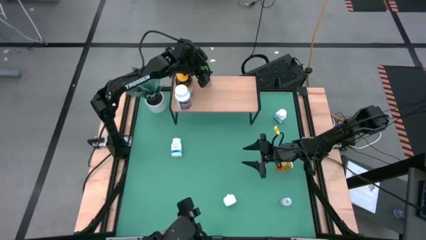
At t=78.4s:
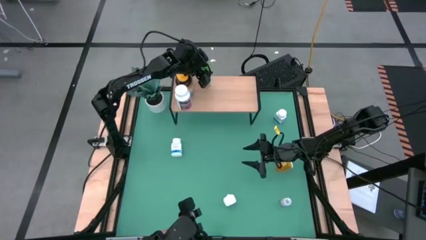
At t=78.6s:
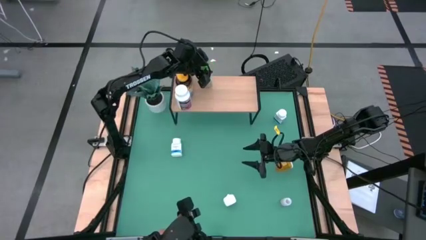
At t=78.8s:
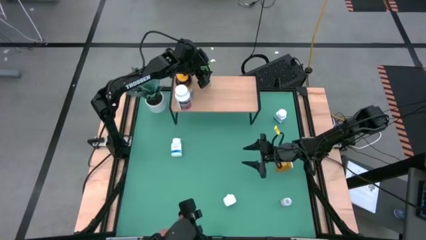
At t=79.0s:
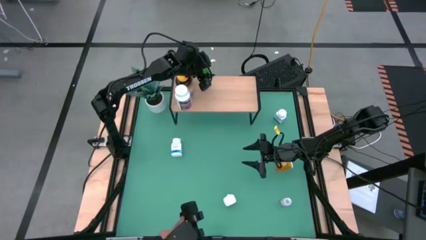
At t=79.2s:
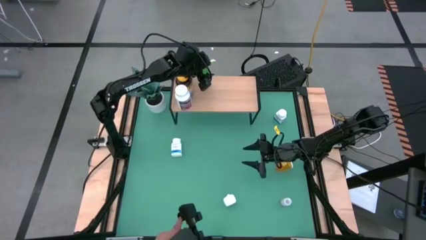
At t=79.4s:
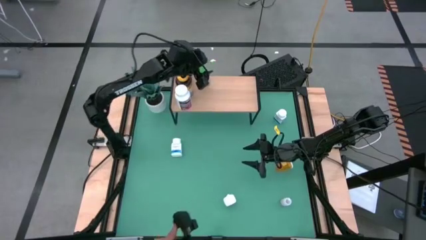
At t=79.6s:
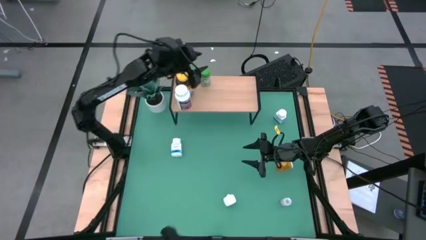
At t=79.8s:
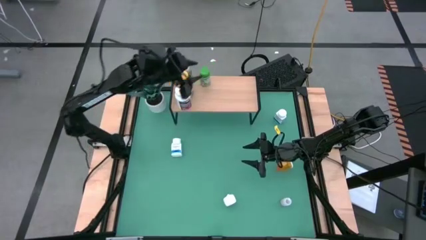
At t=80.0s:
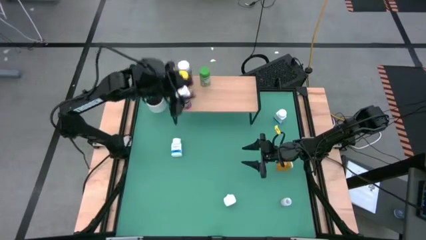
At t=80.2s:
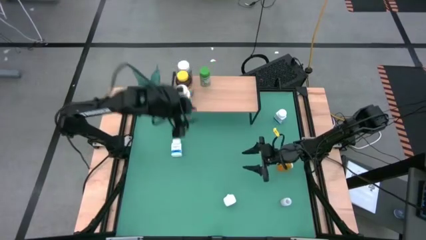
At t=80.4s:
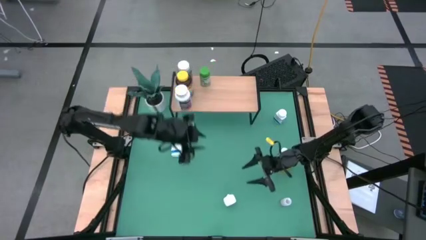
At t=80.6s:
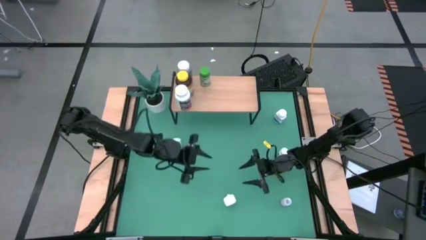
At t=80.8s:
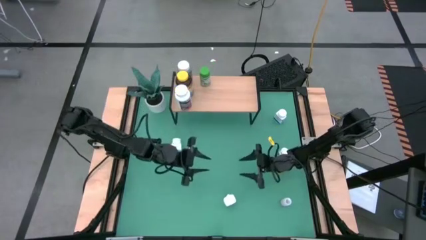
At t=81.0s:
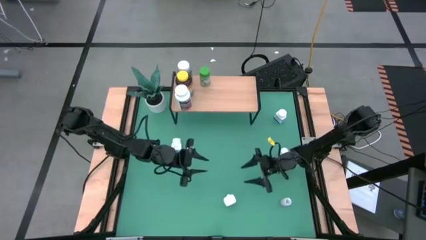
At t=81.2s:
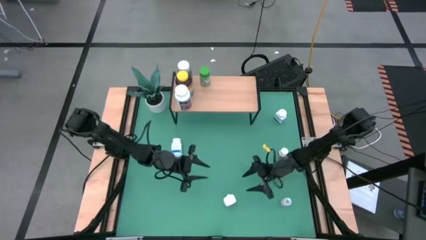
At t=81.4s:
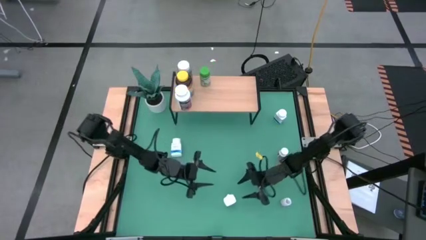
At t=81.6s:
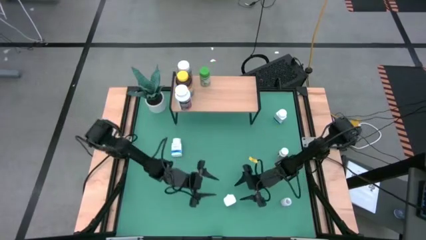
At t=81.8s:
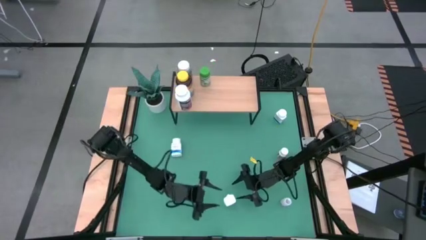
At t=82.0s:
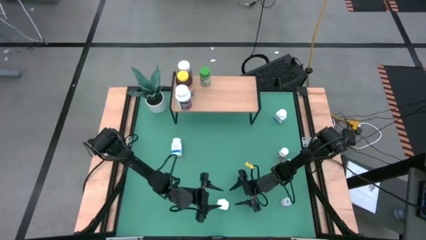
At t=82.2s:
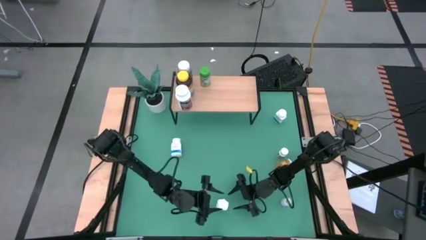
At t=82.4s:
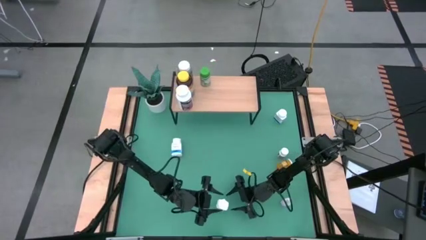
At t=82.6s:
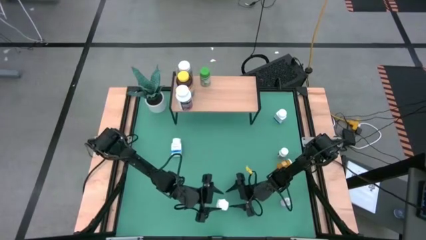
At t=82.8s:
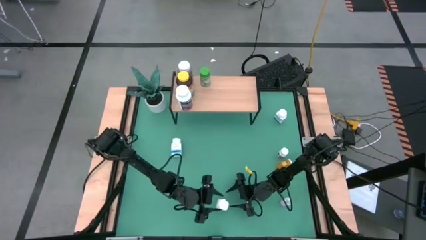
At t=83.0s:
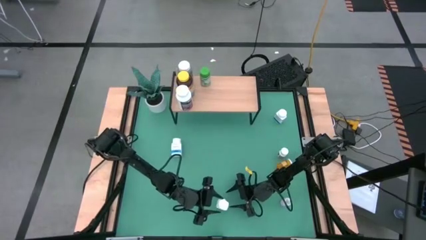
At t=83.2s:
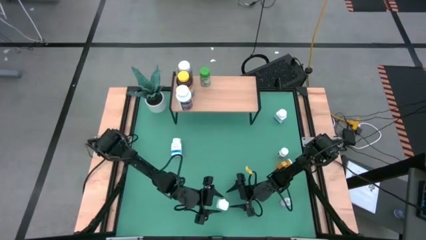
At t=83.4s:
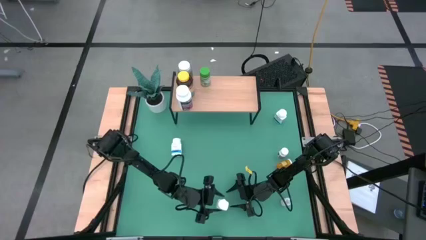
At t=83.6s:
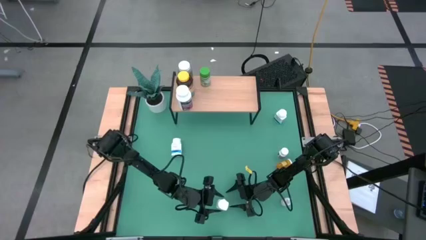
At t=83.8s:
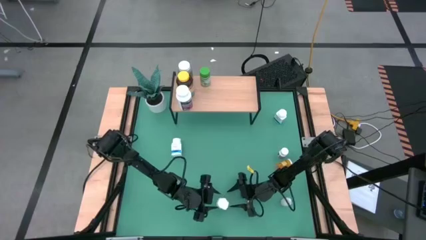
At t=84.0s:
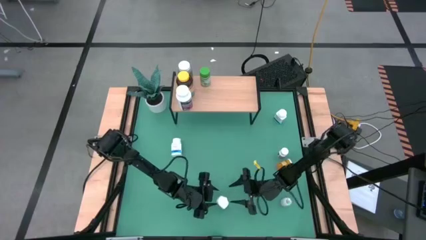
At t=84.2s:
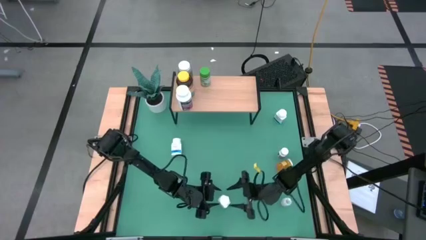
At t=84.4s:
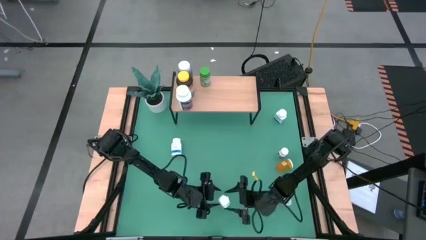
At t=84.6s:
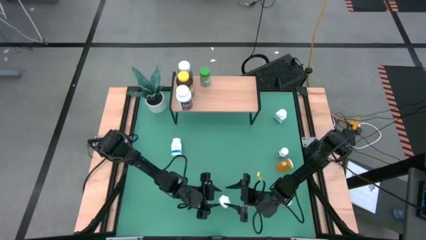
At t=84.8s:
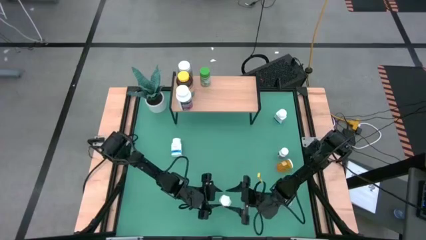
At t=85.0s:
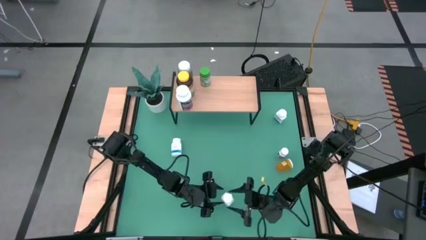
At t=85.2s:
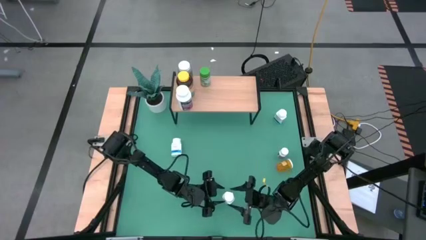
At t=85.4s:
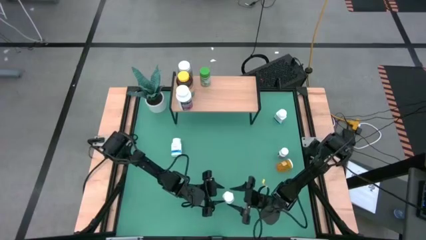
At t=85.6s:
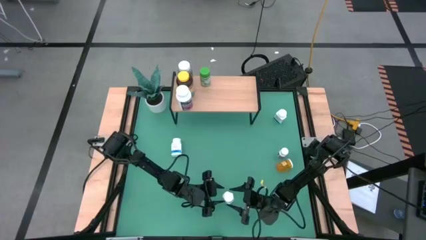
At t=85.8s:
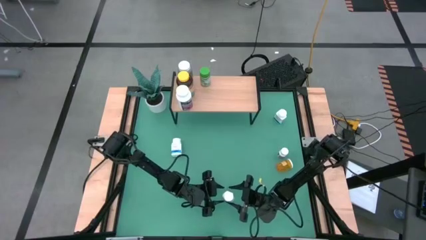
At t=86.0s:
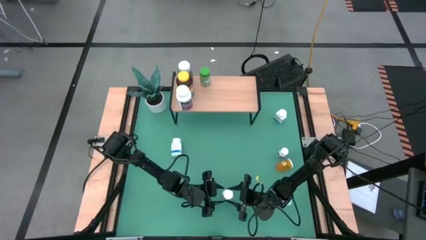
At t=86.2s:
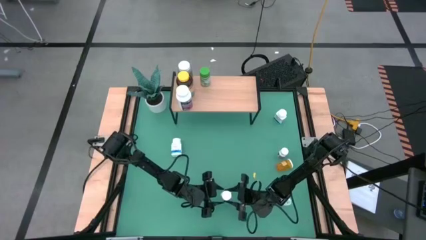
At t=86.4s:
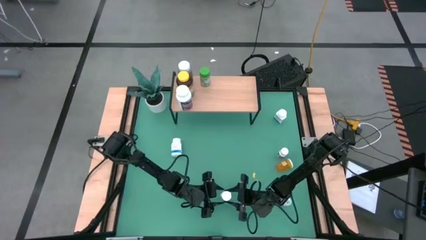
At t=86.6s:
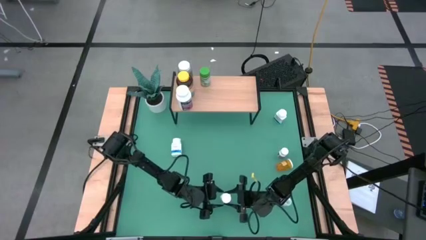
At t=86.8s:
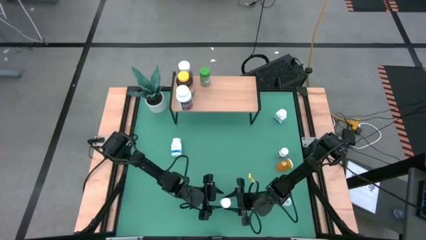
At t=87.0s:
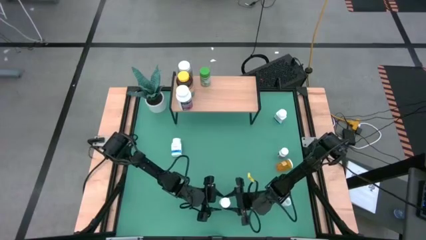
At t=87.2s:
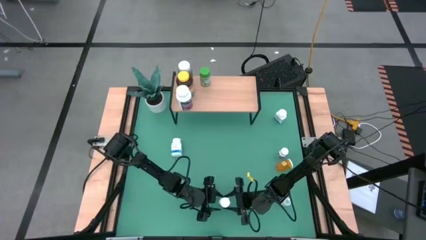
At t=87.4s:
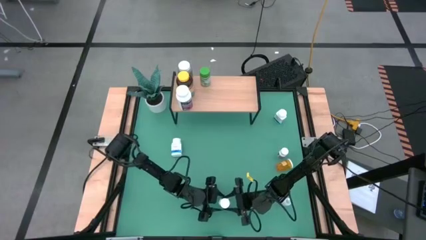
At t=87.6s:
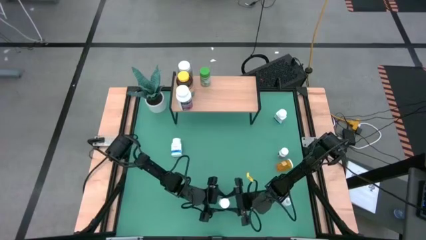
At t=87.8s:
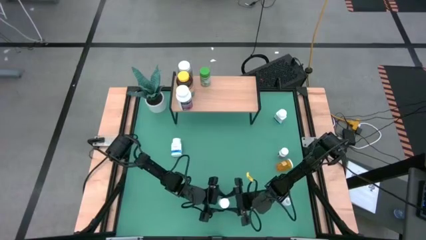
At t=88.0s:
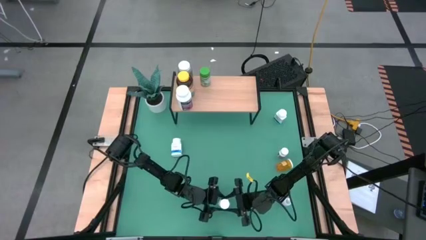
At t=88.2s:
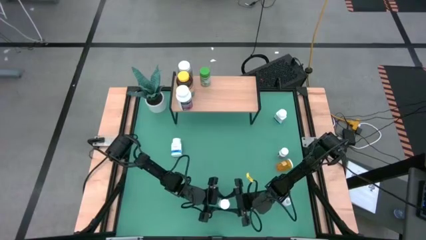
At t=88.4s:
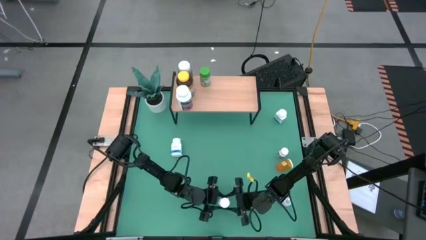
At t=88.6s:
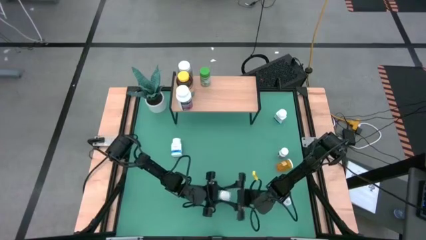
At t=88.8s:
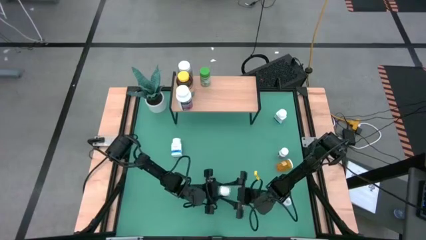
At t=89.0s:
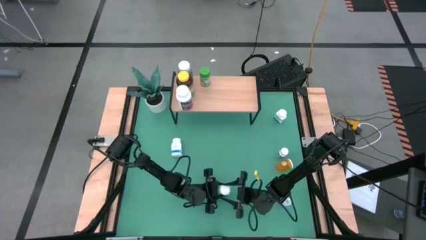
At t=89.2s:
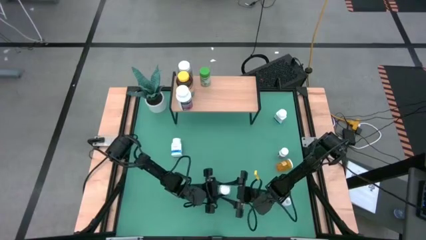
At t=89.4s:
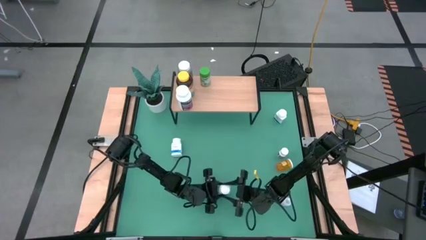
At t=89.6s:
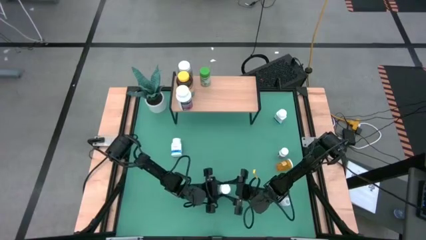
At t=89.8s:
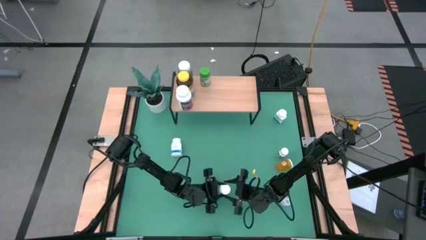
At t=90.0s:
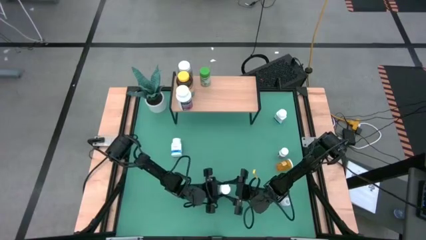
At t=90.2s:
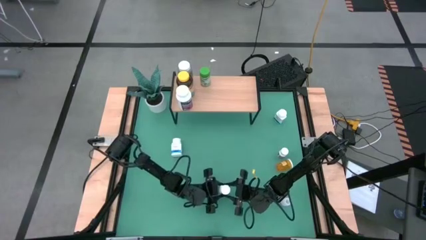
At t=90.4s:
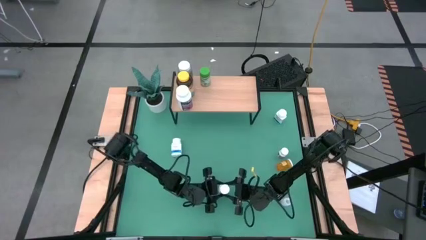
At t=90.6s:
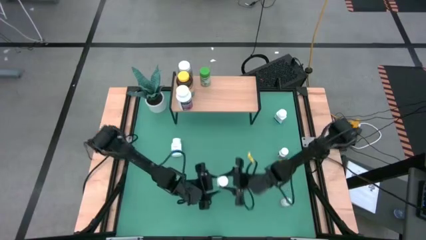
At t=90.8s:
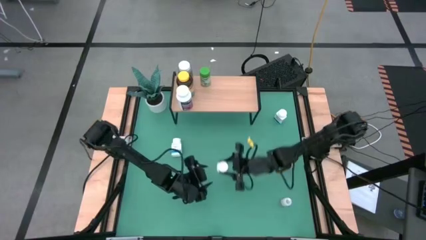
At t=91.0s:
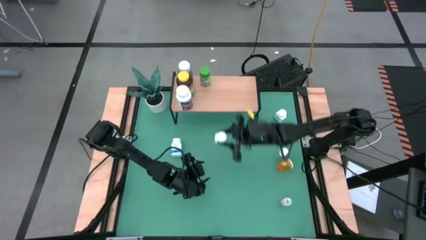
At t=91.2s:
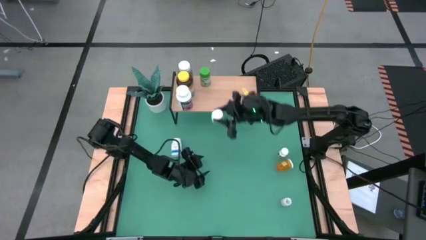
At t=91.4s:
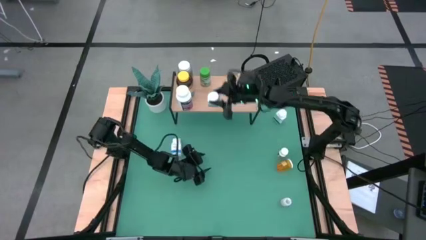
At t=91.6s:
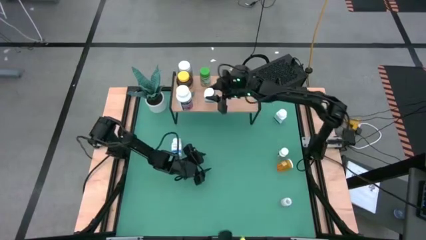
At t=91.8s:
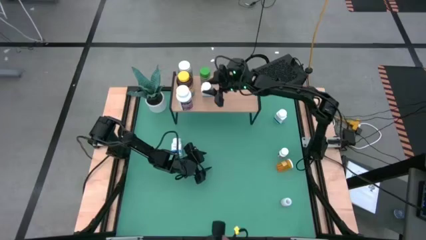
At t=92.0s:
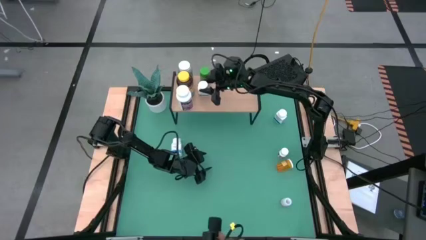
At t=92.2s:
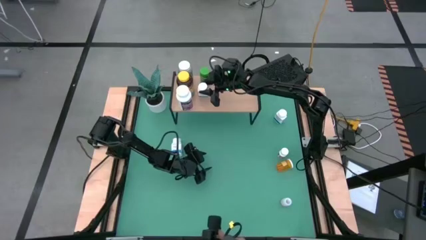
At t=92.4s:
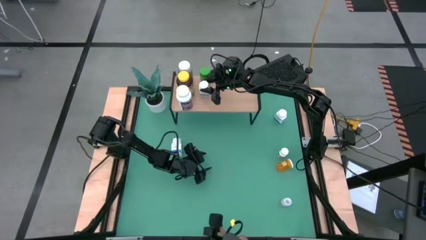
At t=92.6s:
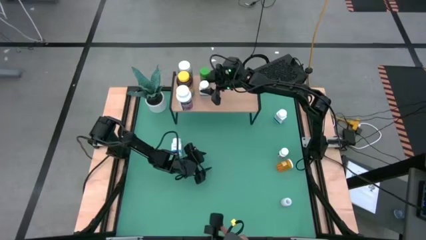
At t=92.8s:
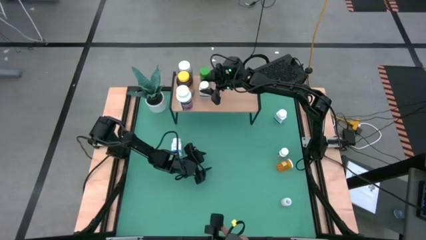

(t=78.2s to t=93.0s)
Task: Pick and place medicine bottles onto shelf by color
Put the bottom blue white pill bottle on the shelf
